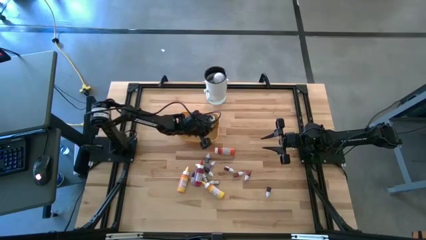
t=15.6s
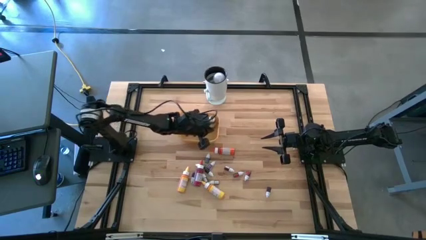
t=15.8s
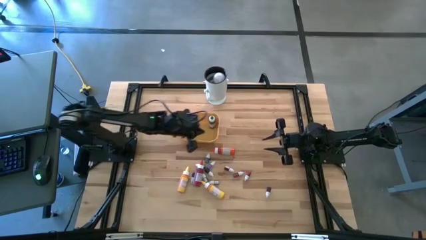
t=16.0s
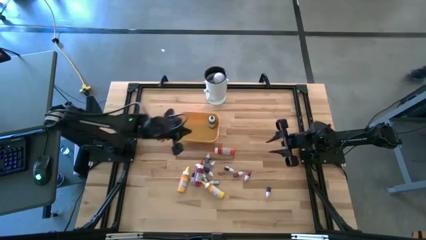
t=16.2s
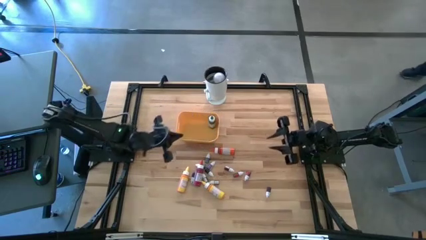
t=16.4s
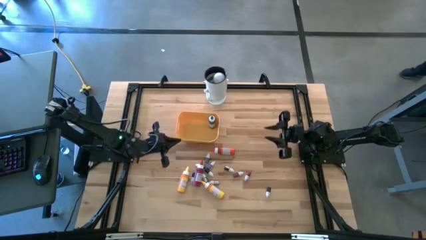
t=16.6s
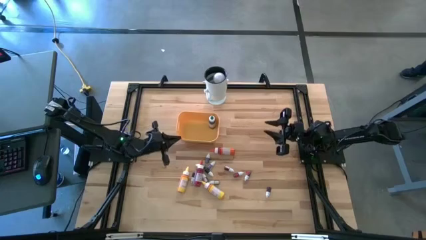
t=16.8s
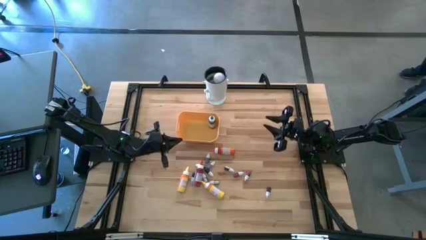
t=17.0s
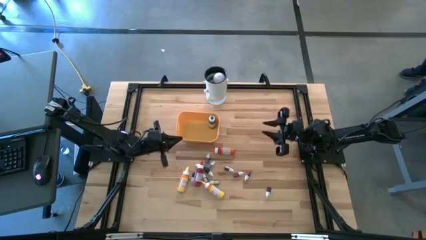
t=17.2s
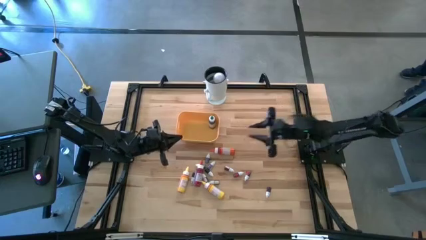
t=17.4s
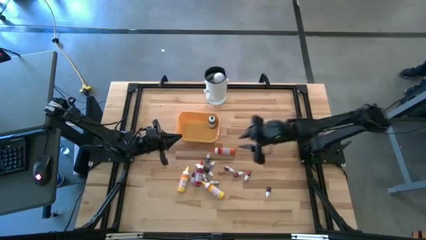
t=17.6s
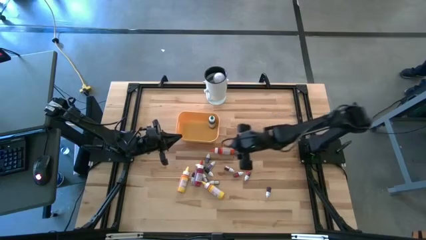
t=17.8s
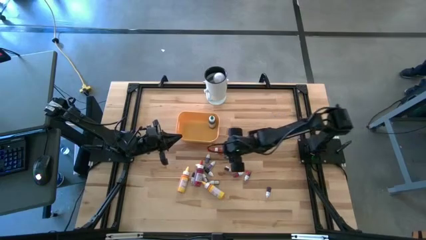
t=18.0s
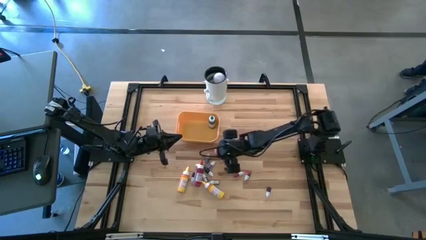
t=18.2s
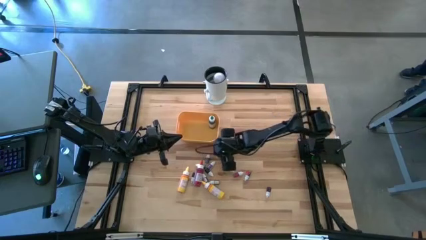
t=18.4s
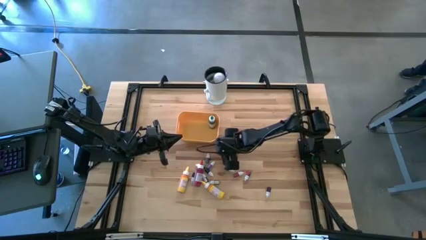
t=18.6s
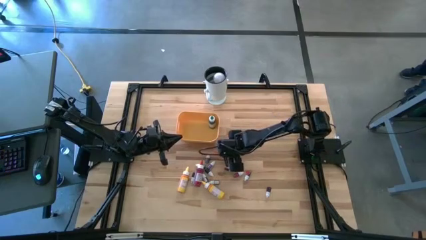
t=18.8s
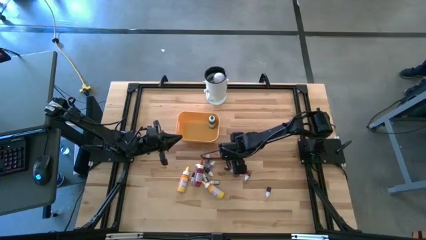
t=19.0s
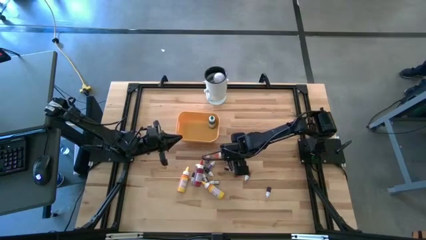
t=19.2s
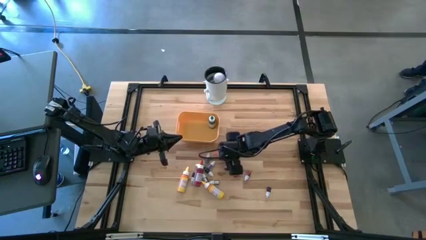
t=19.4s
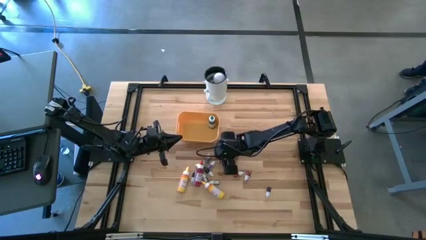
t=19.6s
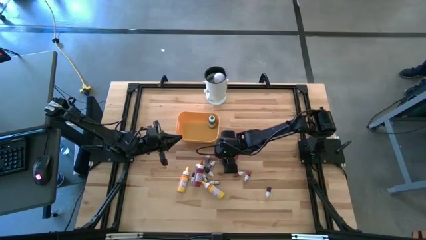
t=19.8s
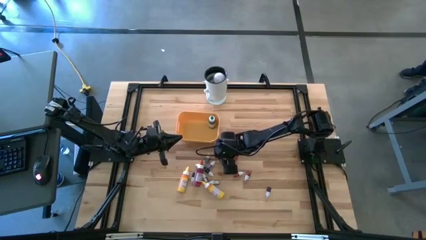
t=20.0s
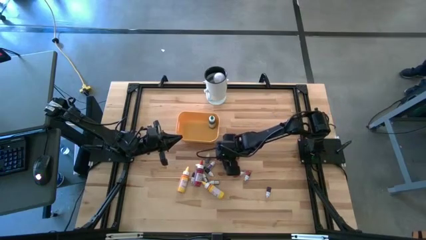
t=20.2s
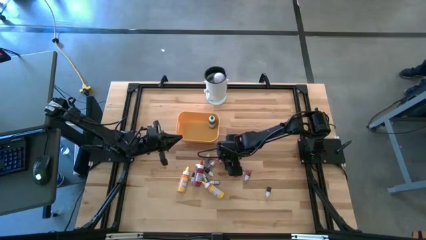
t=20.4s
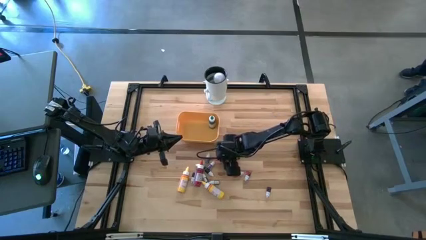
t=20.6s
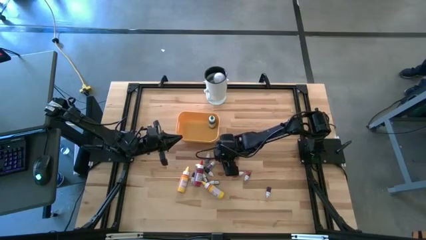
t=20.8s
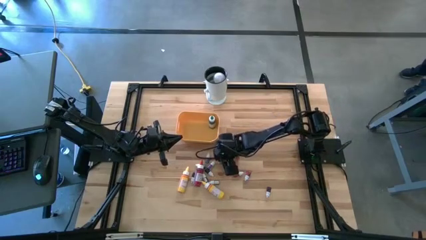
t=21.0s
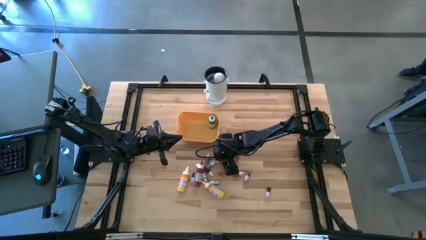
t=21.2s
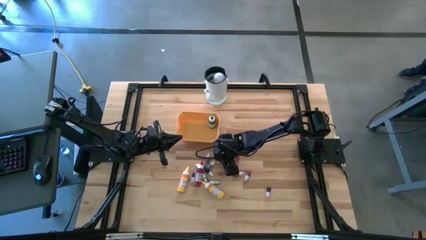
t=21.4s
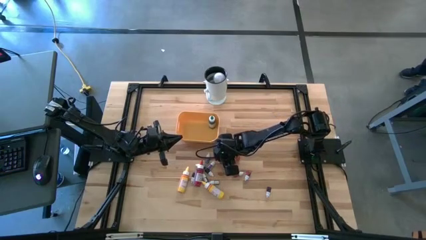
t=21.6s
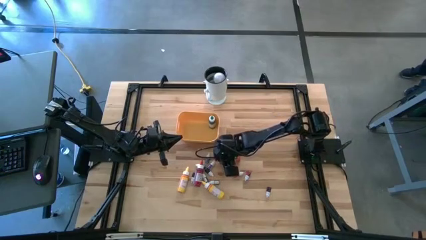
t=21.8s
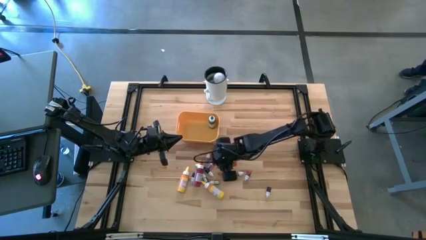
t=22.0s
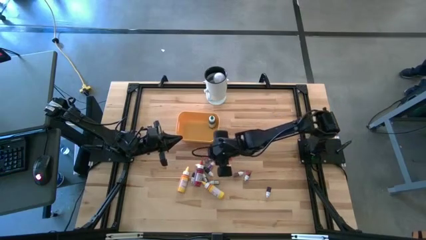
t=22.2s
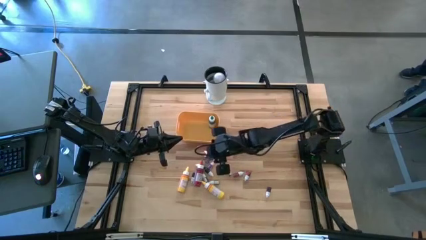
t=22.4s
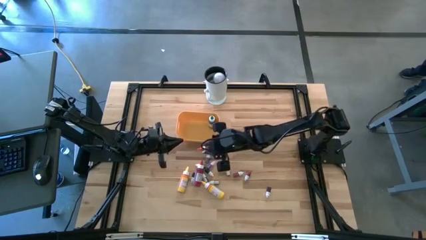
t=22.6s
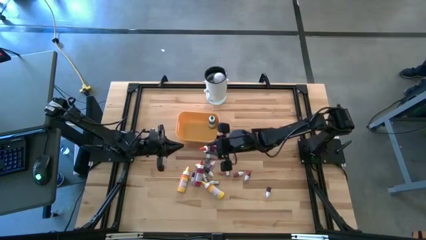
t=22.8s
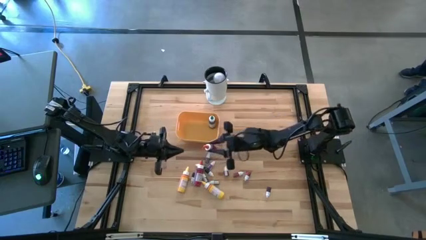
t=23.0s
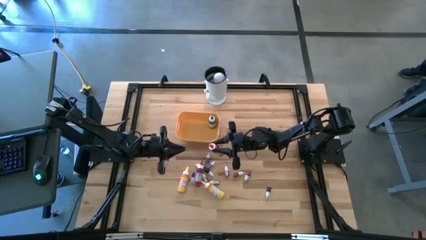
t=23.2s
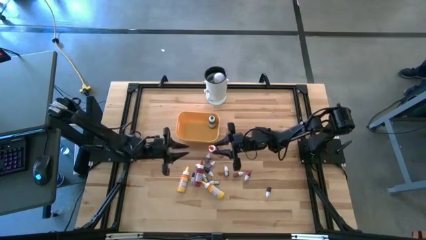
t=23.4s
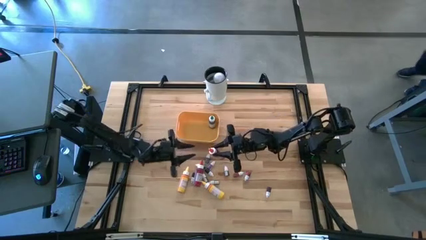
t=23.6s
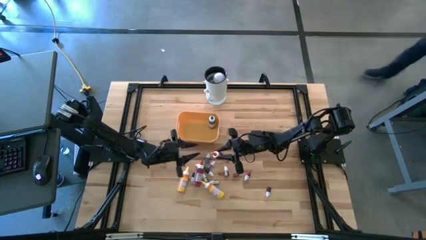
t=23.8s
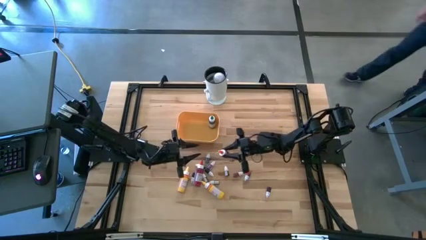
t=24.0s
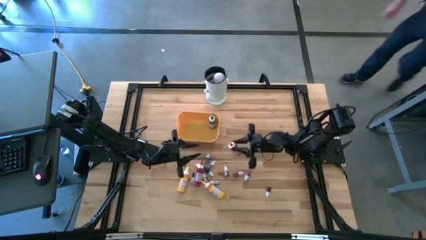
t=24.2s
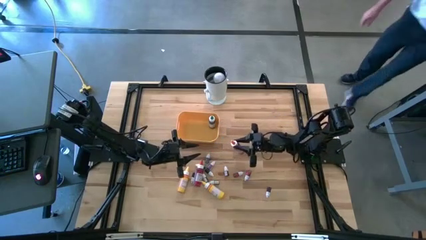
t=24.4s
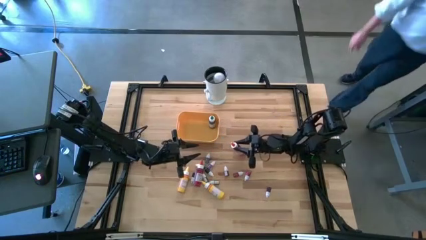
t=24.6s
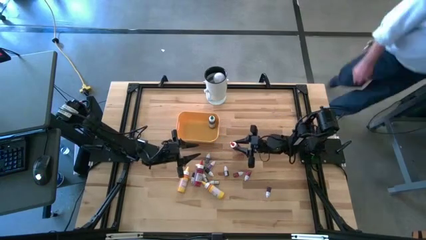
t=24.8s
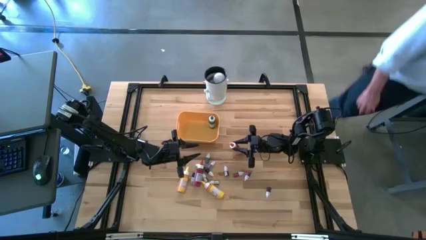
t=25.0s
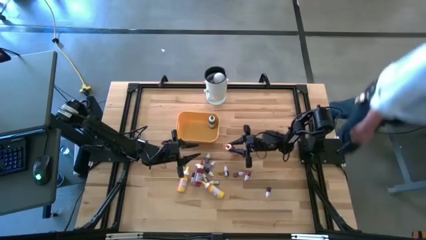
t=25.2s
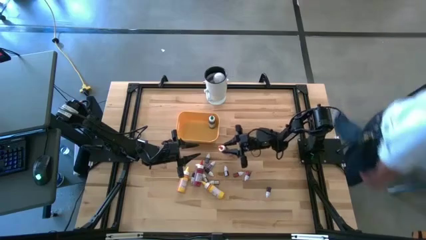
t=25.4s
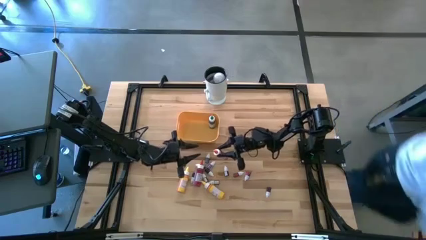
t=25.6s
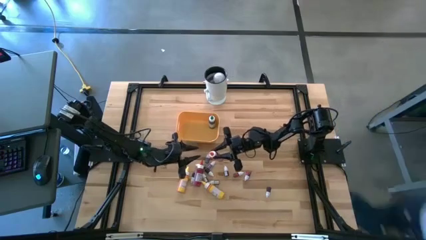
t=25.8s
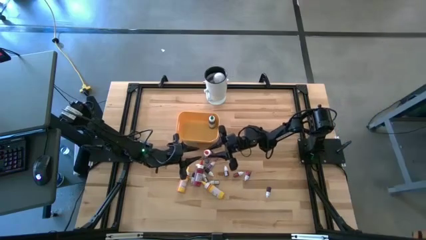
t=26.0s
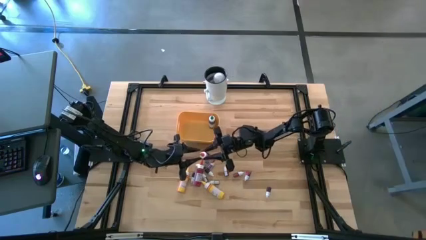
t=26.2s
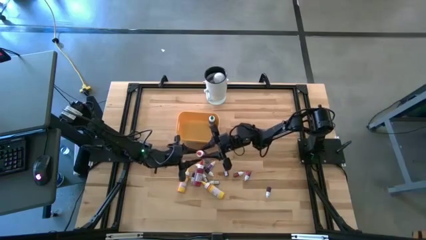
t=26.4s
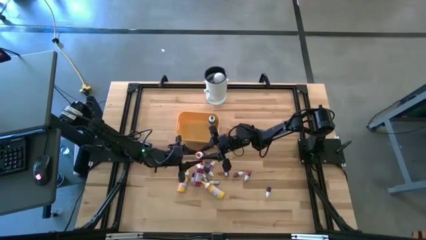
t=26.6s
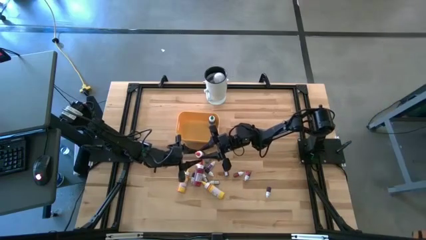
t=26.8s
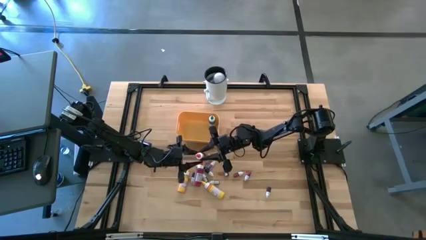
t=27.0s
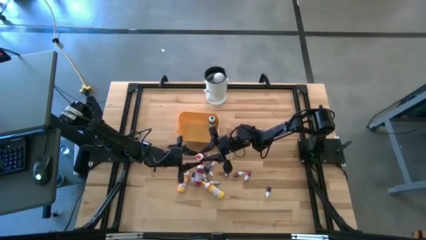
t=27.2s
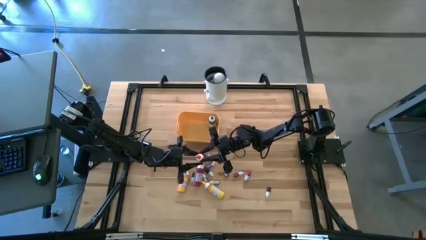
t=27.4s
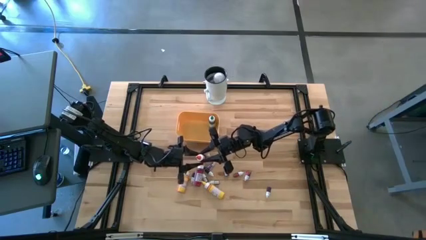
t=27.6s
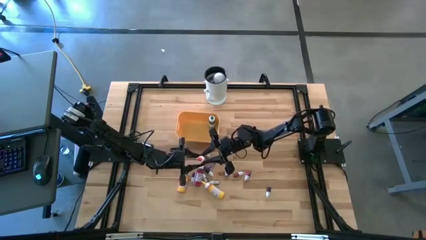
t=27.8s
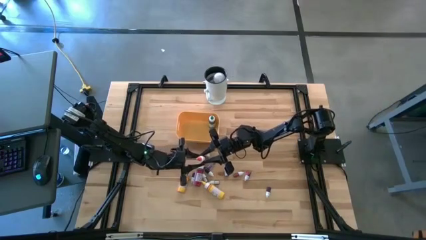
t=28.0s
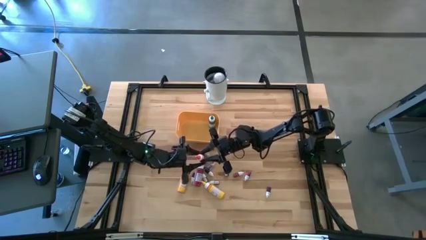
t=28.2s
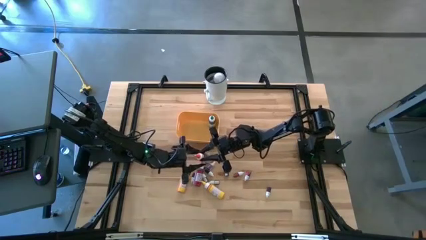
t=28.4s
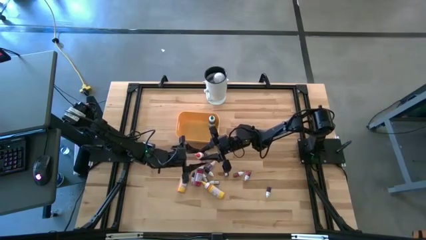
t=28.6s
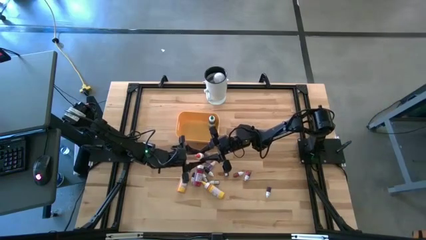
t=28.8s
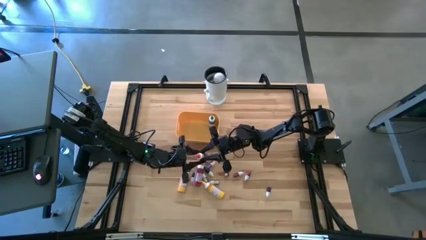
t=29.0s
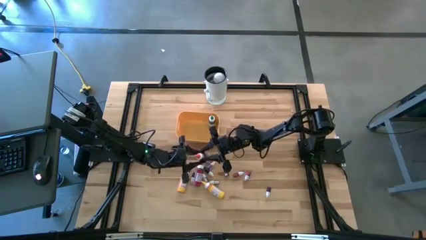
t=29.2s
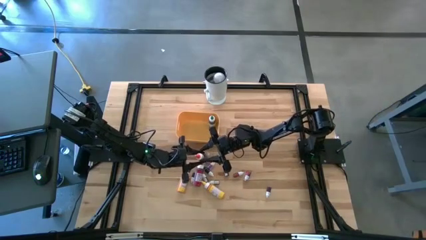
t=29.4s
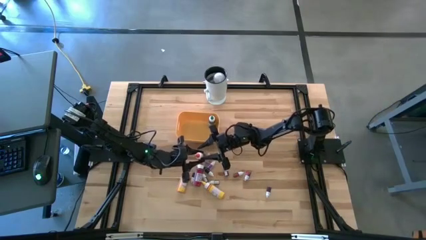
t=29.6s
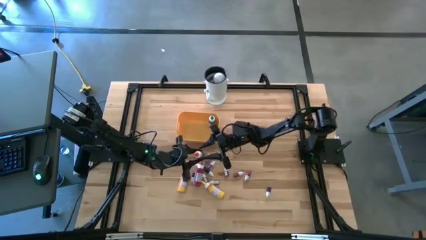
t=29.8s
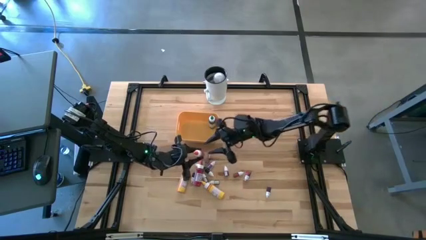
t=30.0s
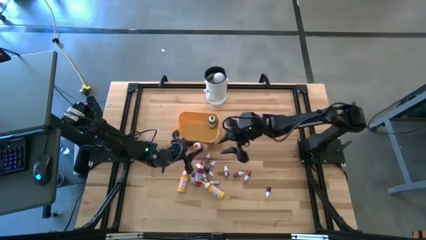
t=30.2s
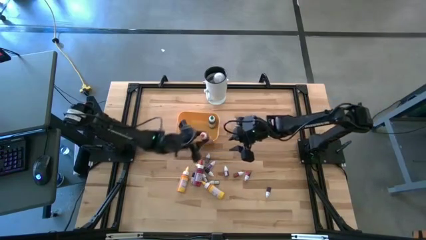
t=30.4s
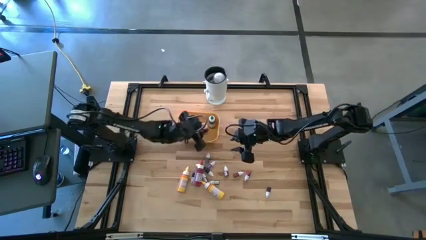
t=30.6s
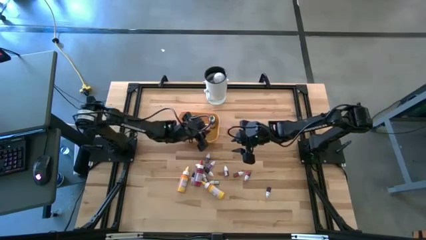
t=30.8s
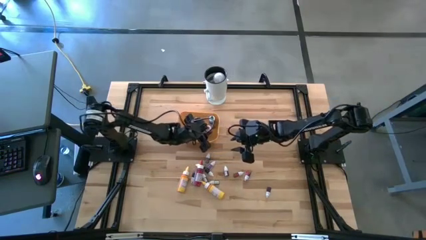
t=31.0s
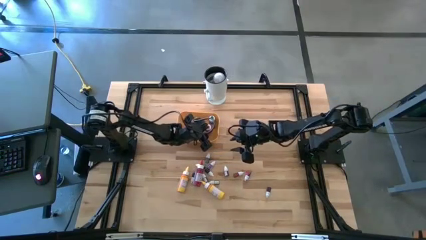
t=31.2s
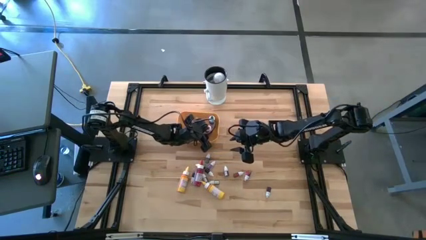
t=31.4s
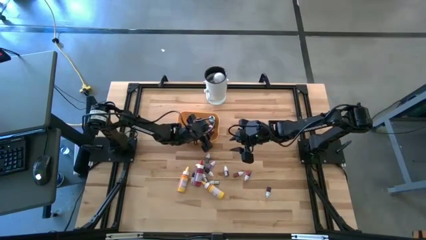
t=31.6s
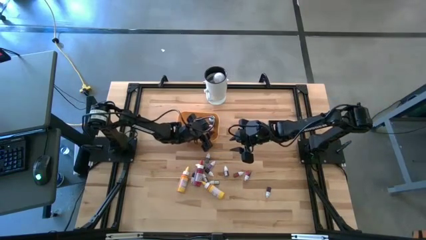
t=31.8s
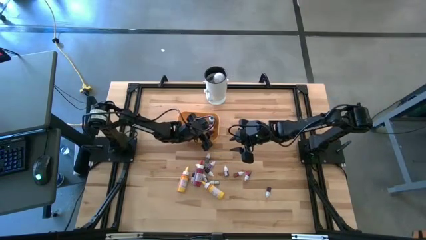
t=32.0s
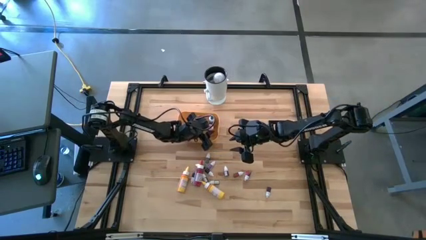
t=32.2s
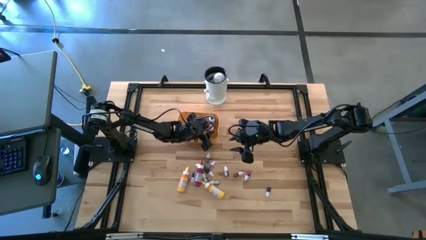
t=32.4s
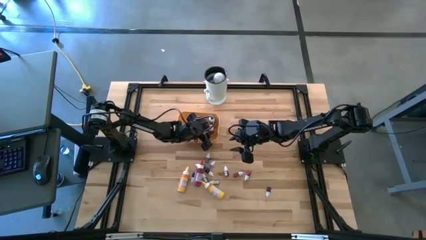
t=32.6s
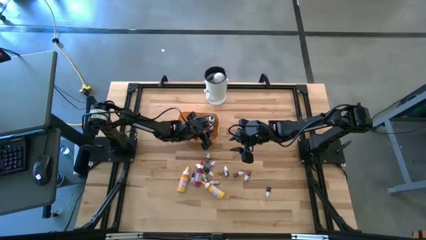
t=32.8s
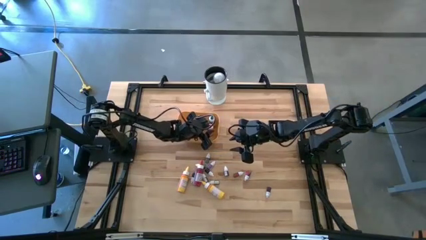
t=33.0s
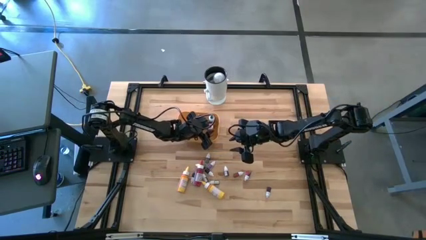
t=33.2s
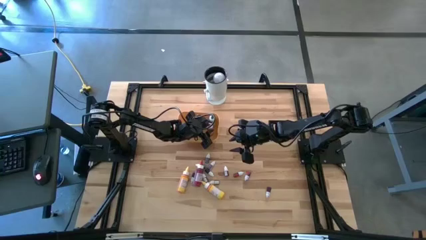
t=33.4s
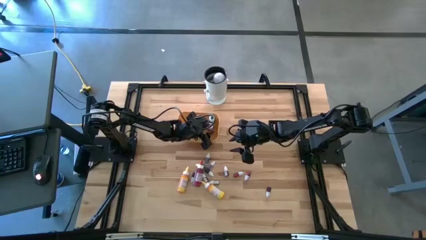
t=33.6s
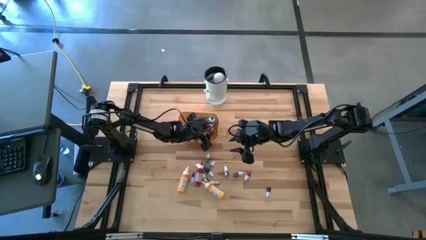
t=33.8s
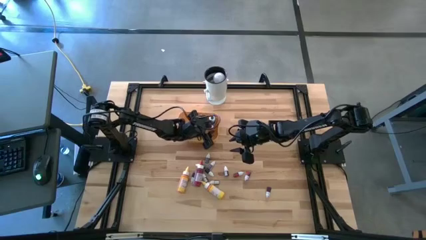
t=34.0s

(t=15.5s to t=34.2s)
Task: Pick & Place food coloring
Put the large orange food coloring bottle into the yellow bin
